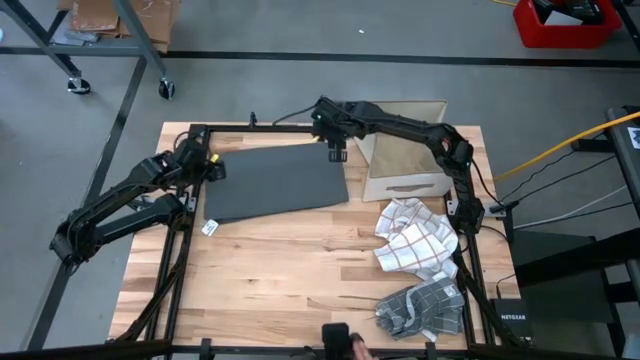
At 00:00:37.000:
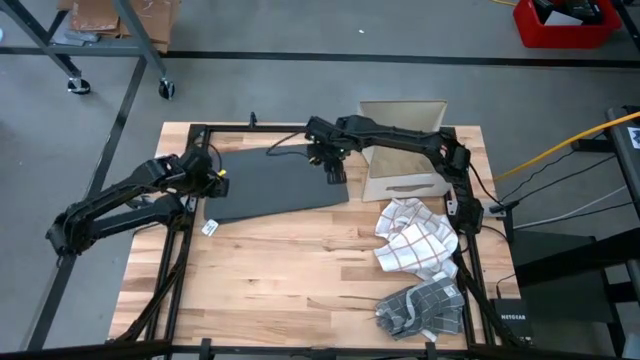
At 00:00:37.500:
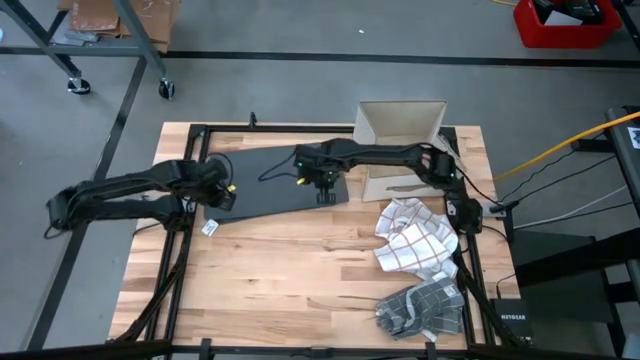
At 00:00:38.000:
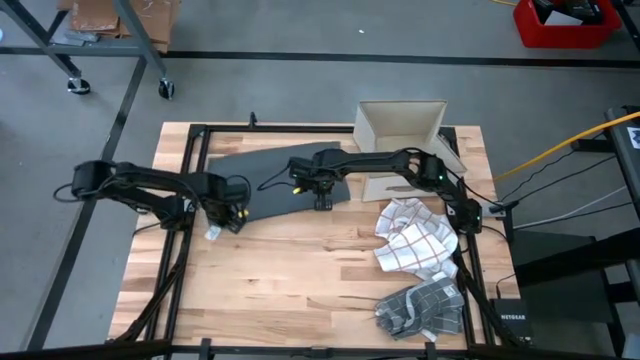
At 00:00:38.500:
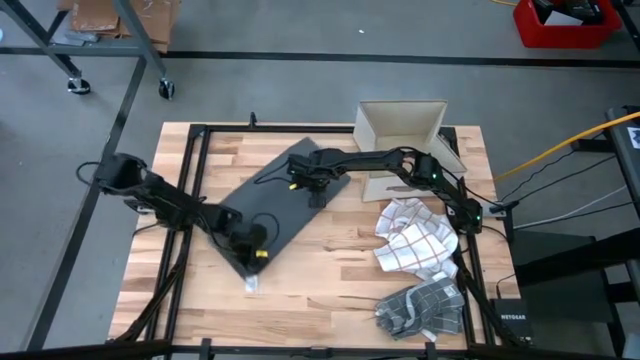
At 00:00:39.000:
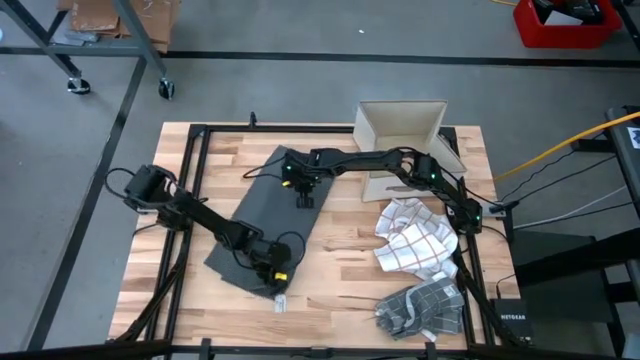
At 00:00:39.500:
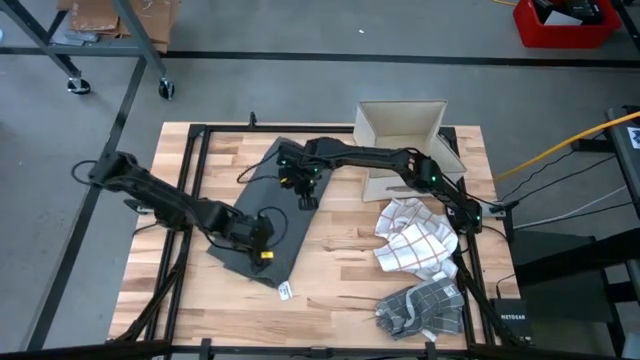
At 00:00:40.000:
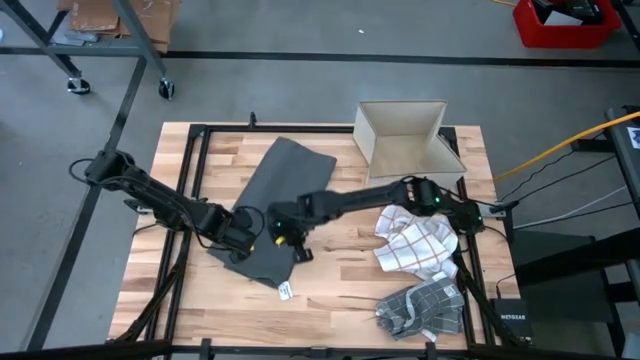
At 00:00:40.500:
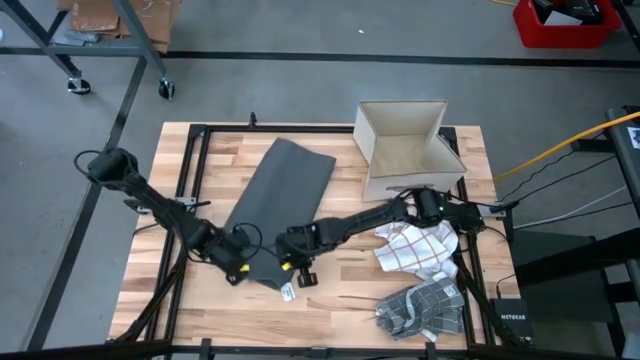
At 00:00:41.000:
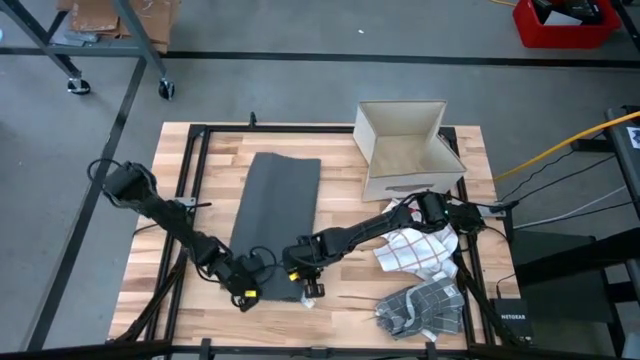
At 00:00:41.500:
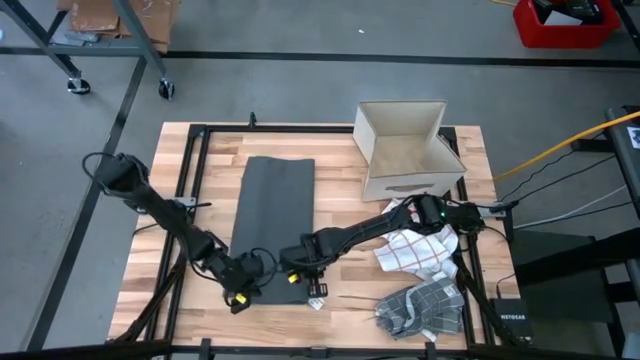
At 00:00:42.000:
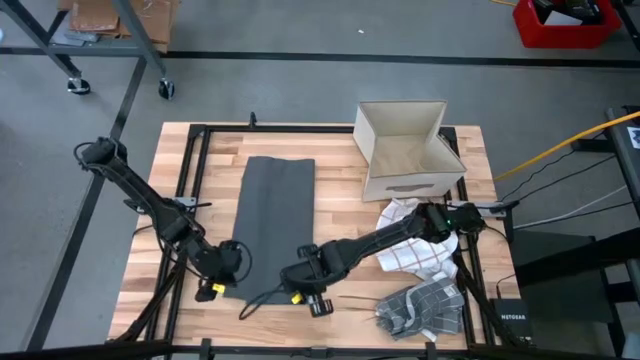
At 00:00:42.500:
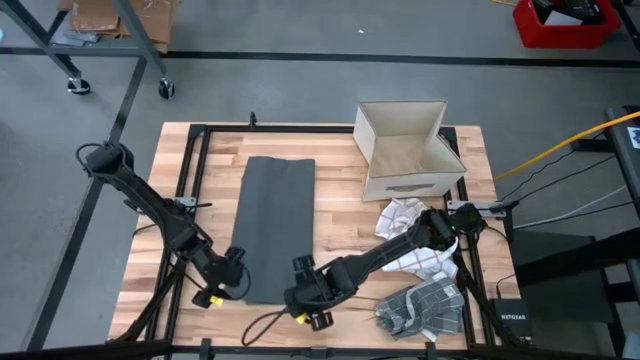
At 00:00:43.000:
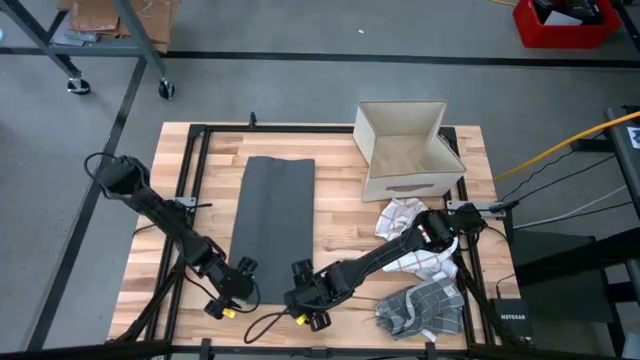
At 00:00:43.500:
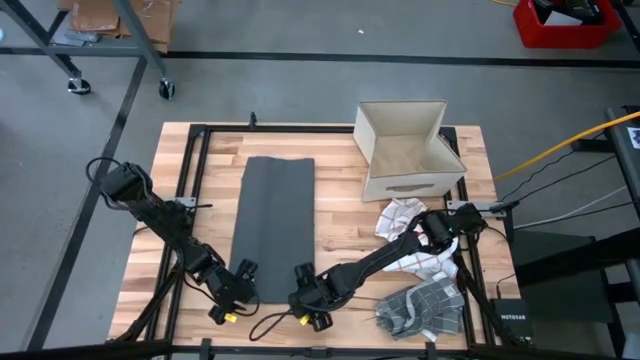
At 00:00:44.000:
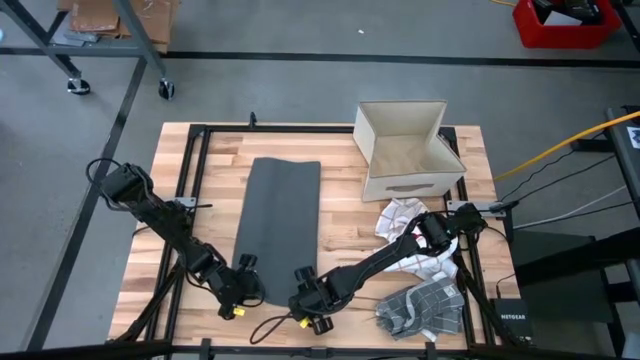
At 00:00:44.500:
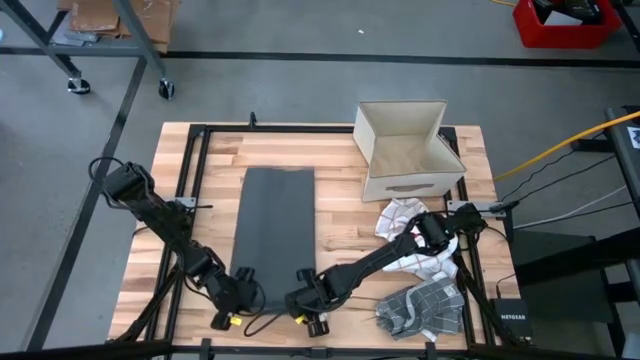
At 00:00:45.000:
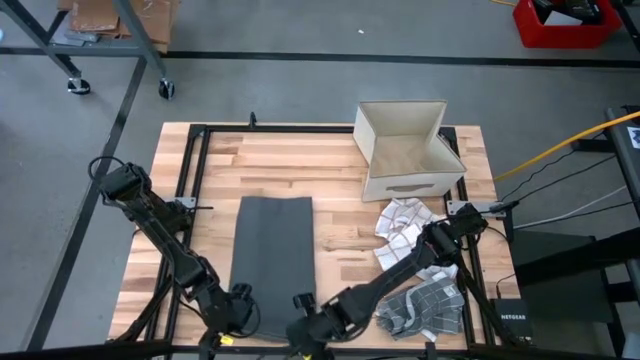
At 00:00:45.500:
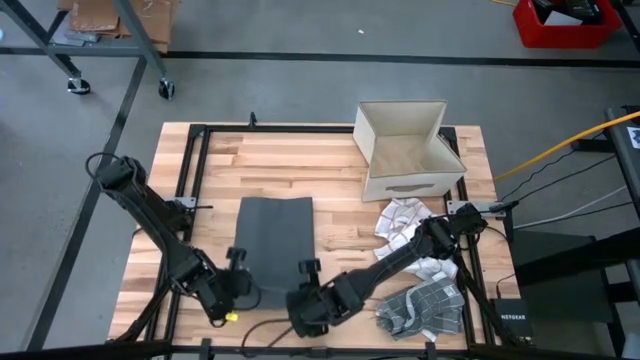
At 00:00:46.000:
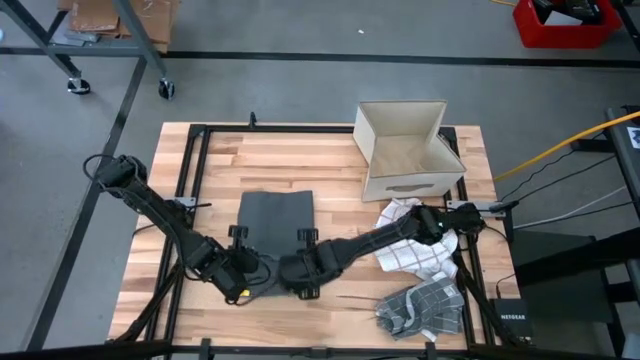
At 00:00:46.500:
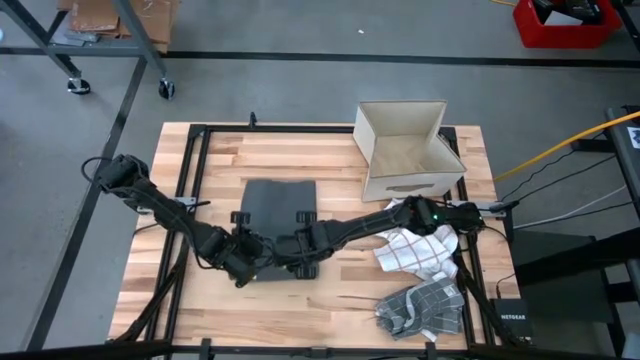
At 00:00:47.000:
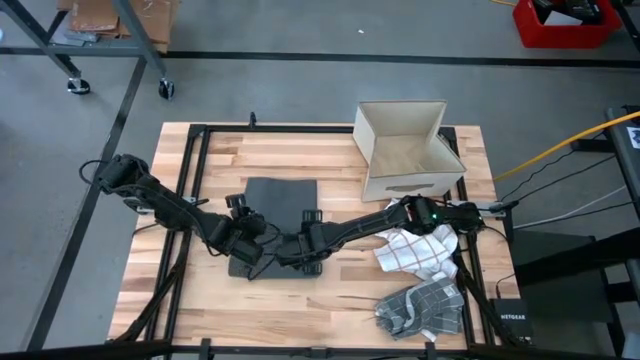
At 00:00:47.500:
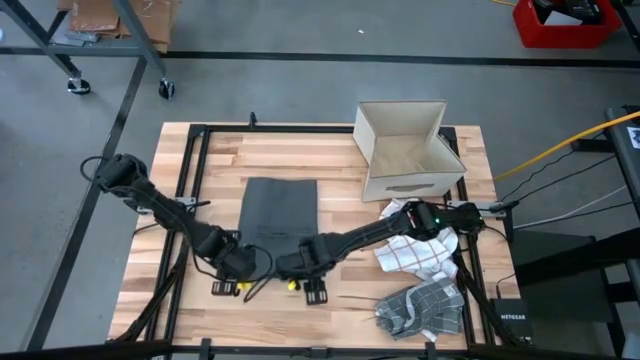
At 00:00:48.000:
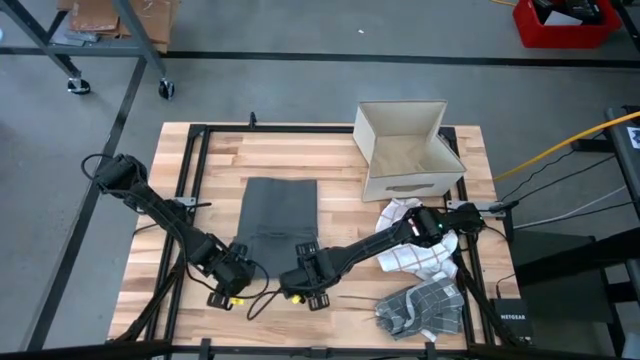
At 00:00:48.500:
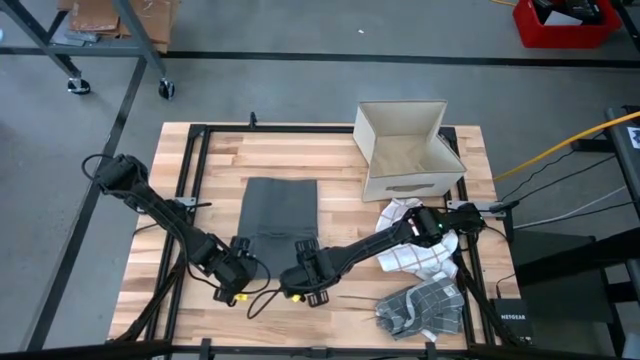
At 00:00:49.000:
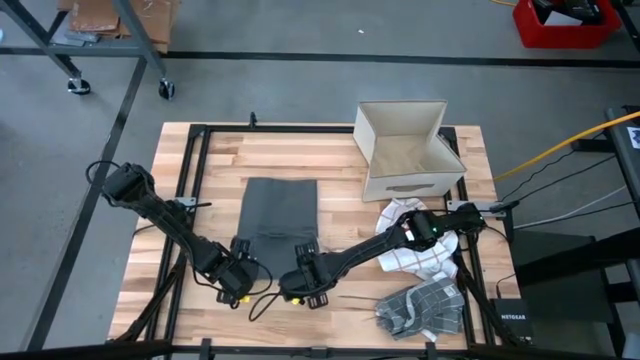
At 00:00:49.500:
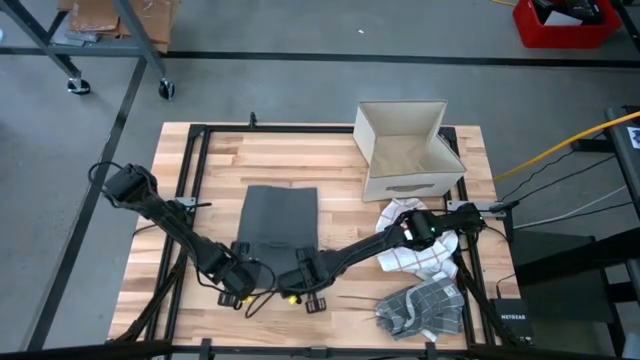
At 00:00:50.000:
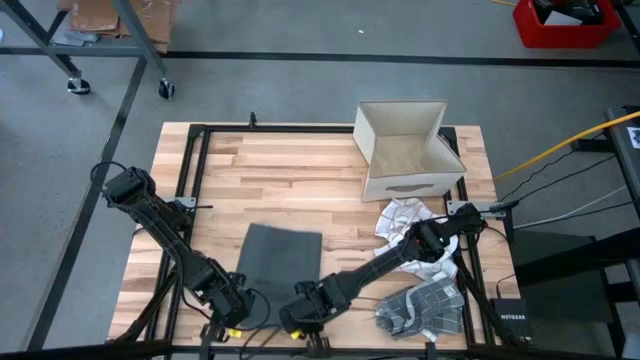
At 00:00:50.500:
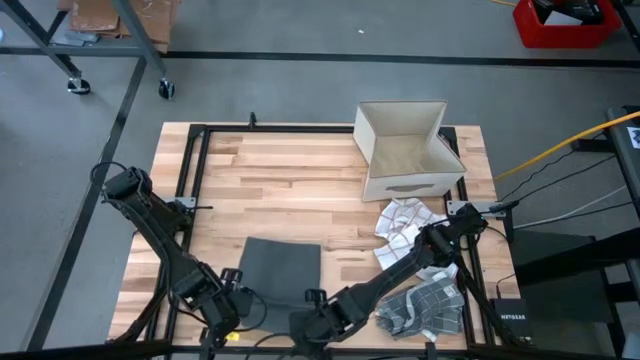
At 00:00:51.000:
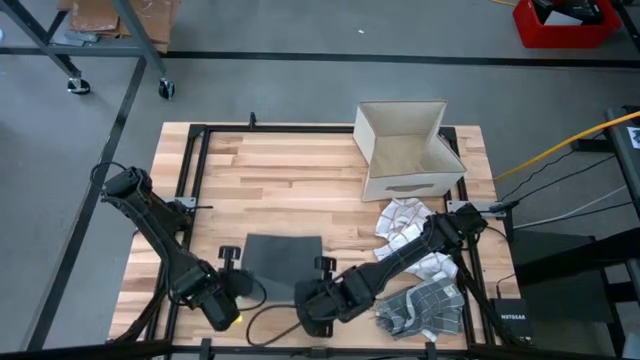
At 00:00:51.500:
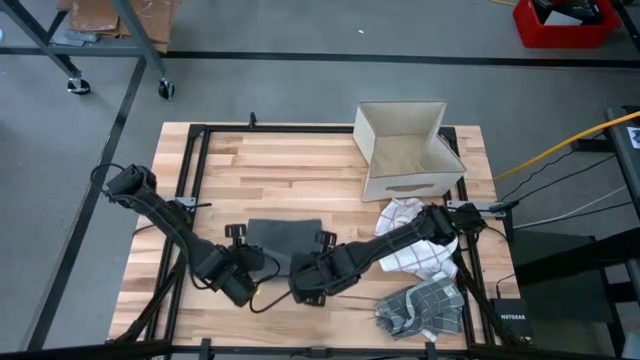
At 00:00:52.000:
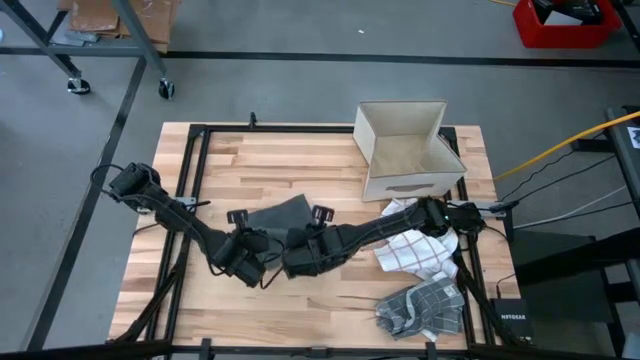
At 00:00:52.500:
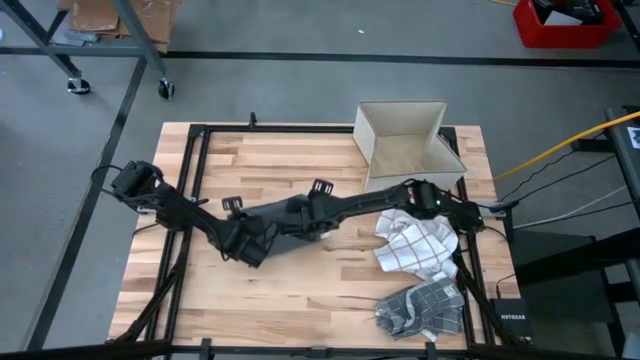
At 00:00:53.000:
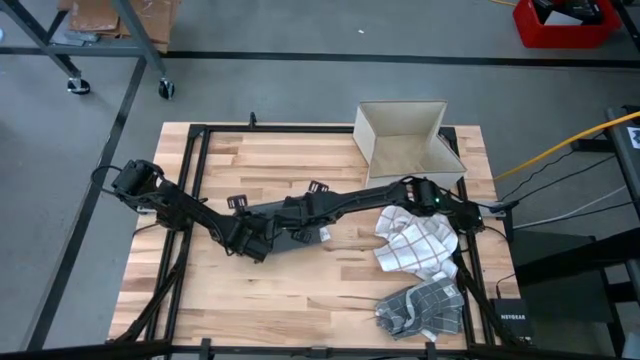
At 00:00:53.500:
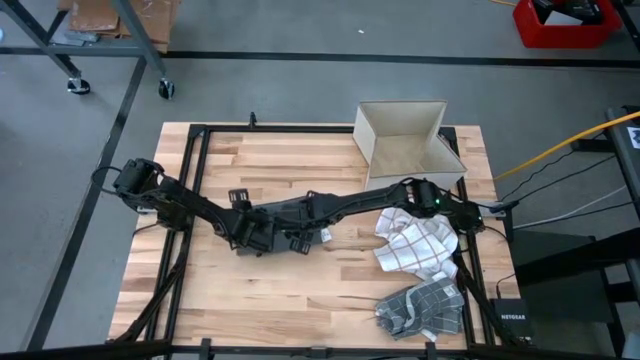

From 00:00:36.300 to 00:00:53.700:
Task: Fold towel
Fold the gray kitchen towel

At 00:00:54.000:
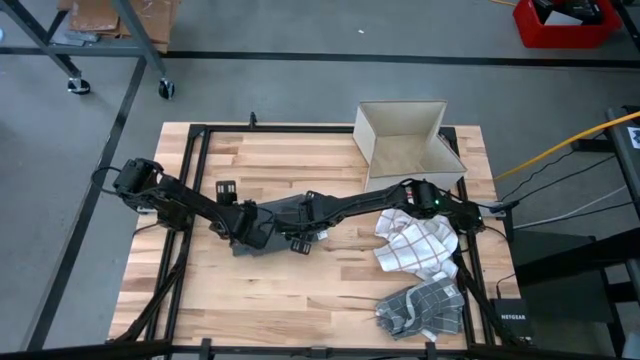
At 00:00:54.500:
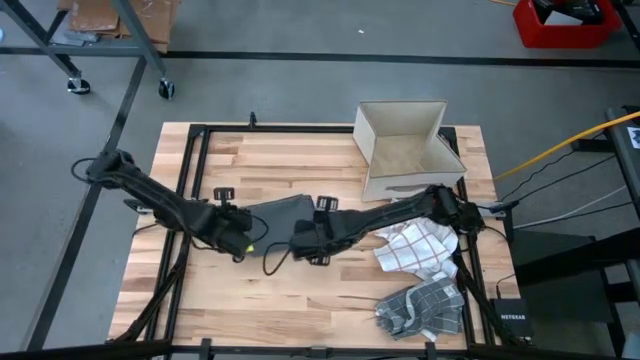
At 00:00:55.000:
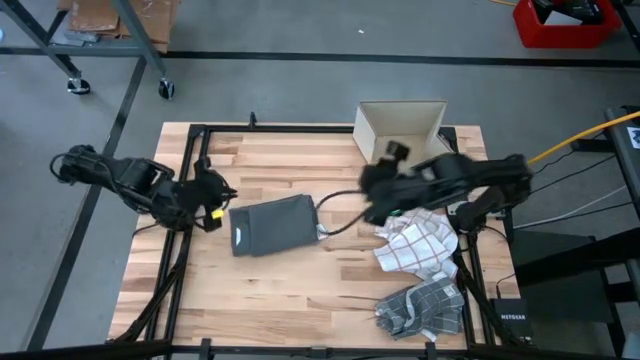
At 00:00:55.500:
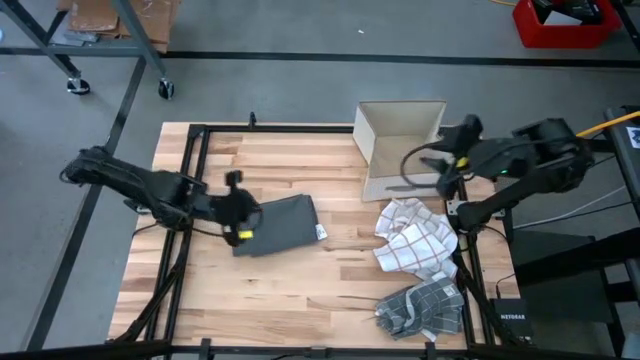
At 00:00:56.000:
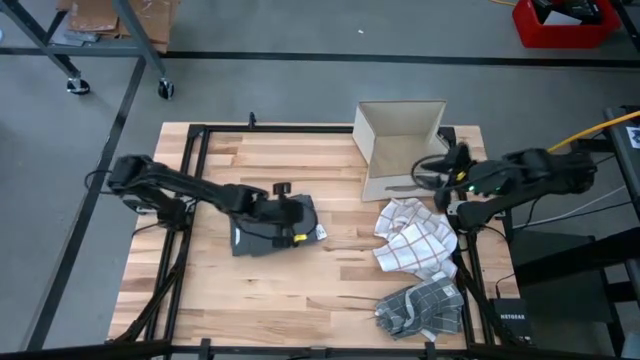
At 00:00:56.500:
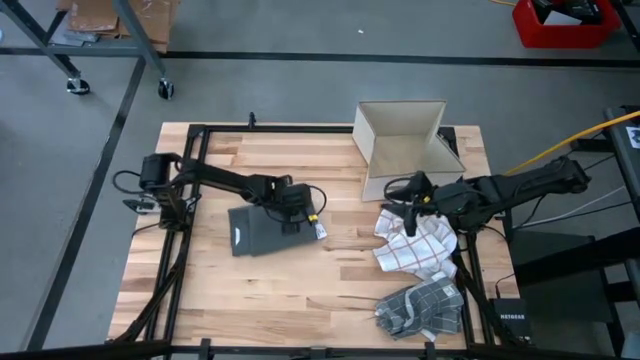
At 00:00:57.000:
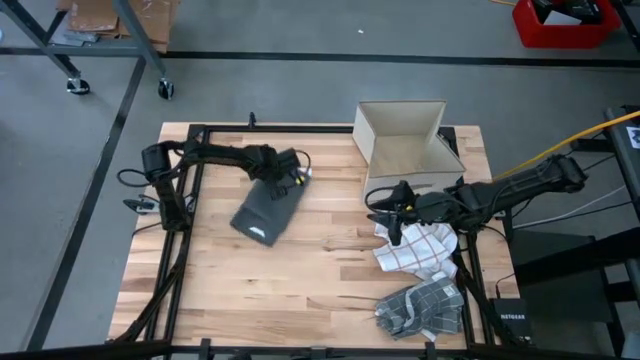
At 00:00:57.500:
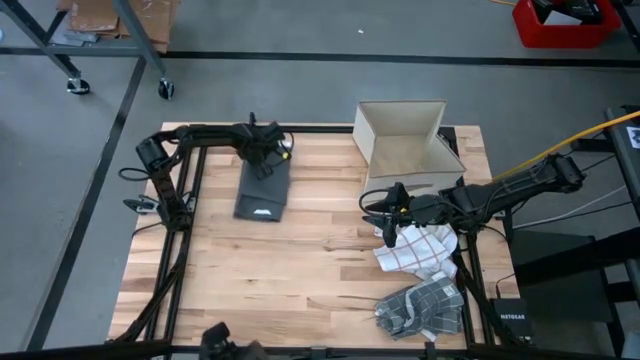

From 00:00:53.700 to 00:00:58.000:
Move the folded gray kitchen towel to the top left of the table
